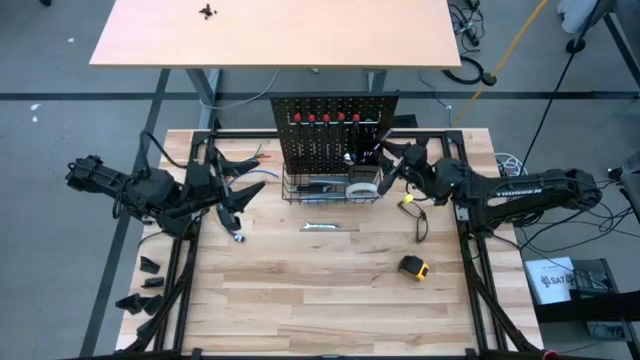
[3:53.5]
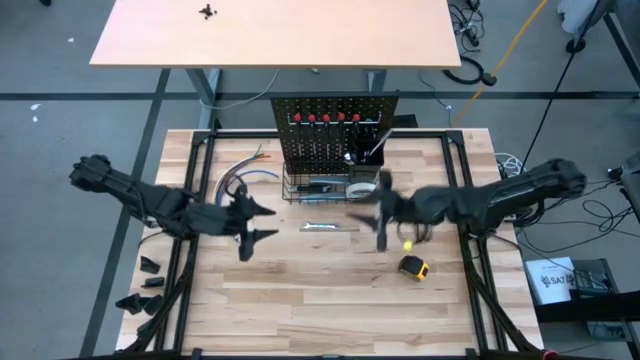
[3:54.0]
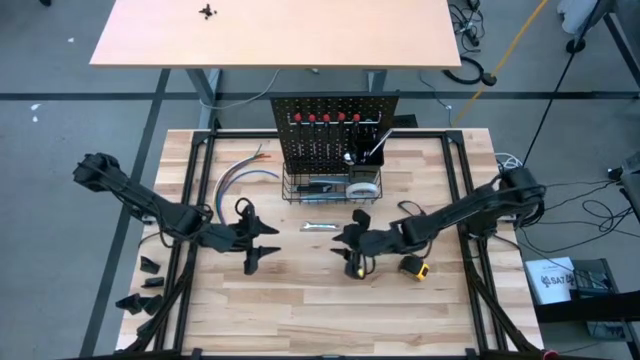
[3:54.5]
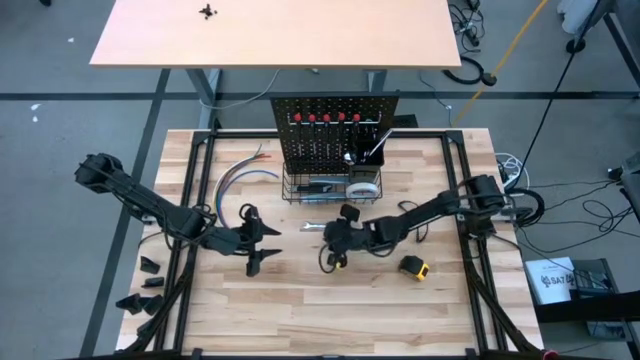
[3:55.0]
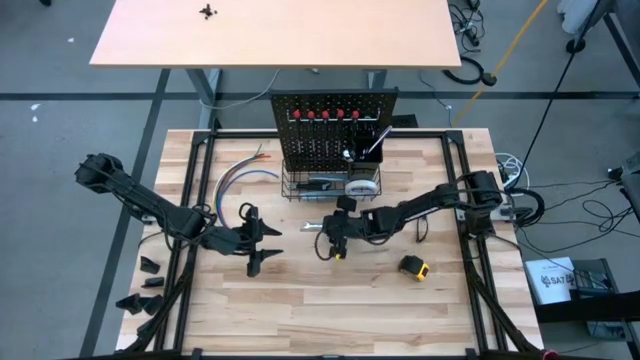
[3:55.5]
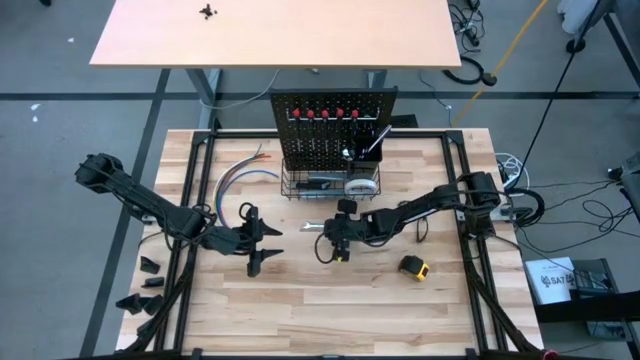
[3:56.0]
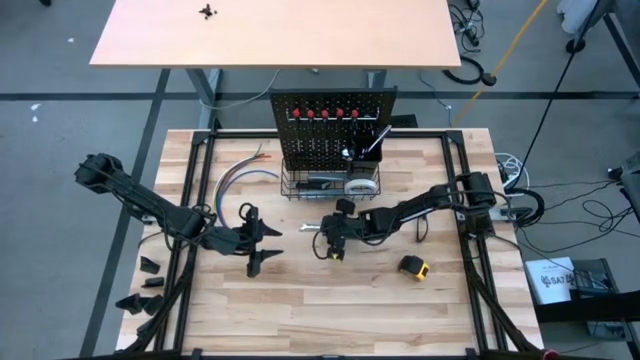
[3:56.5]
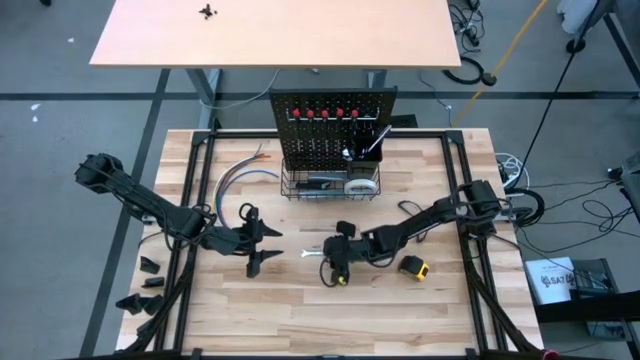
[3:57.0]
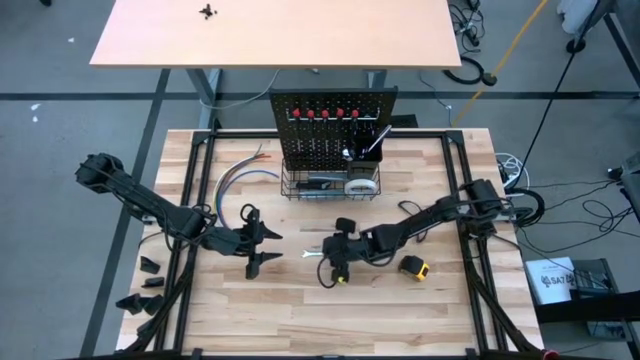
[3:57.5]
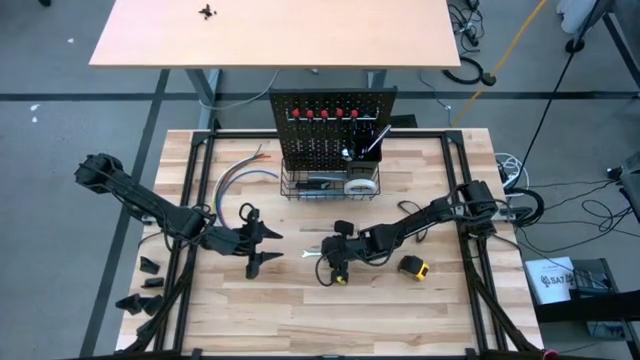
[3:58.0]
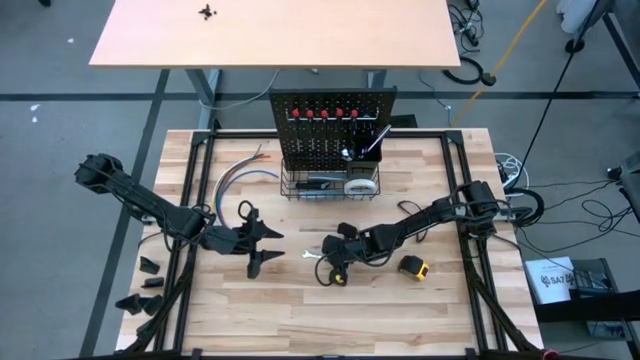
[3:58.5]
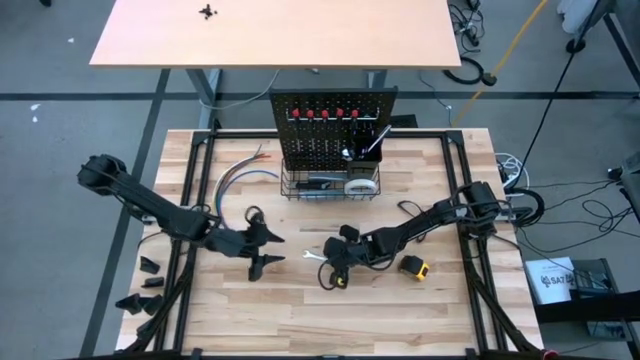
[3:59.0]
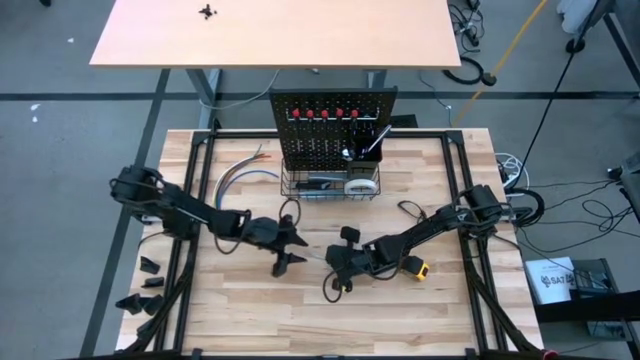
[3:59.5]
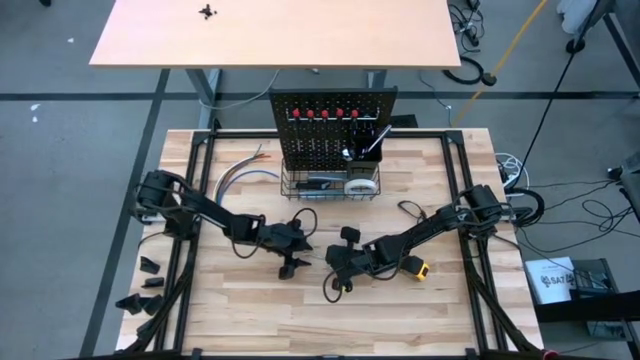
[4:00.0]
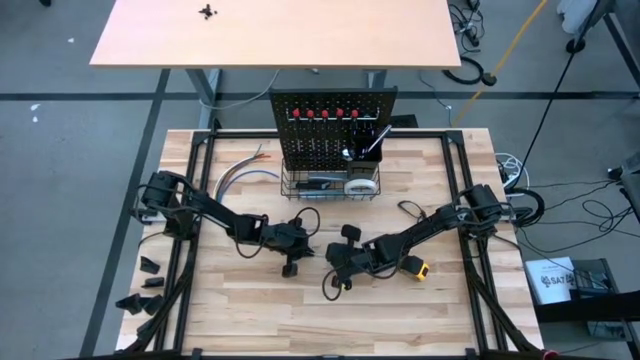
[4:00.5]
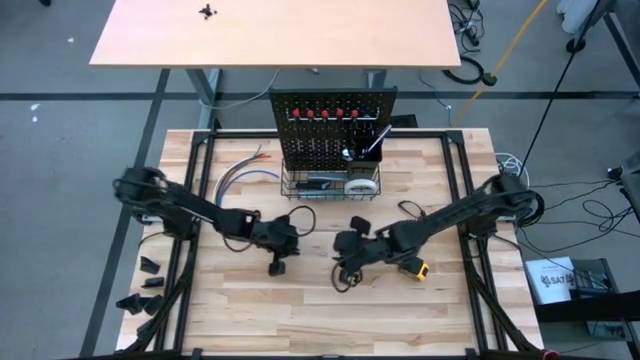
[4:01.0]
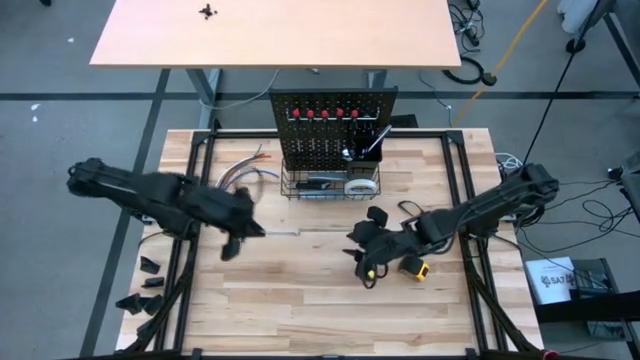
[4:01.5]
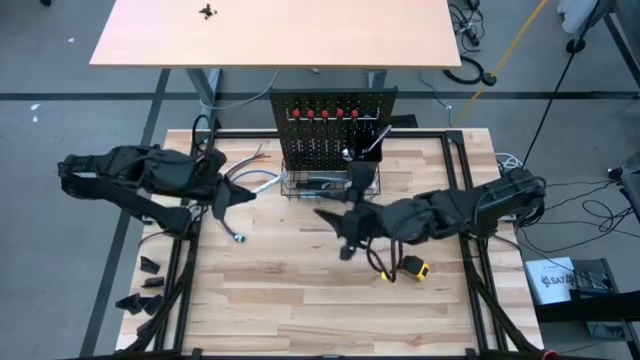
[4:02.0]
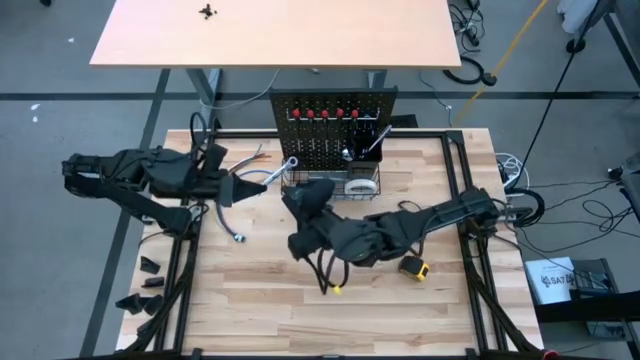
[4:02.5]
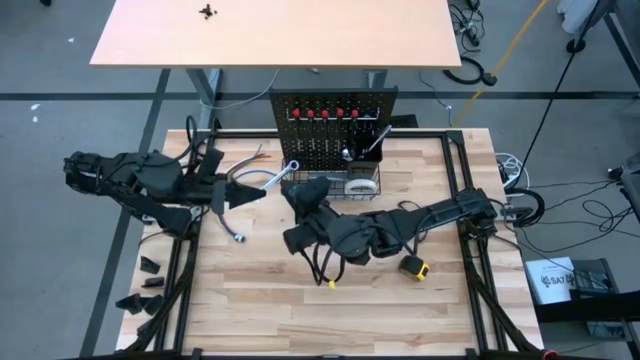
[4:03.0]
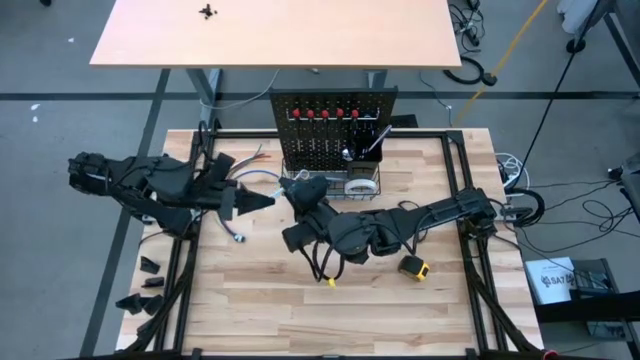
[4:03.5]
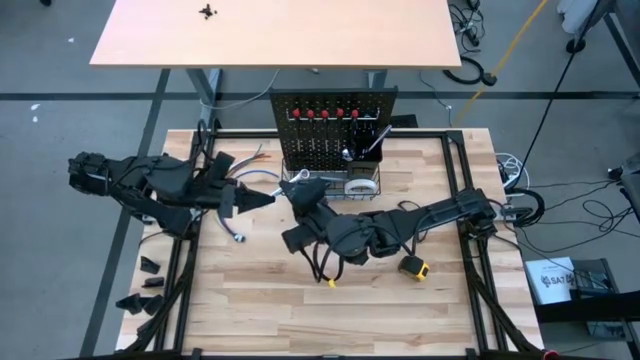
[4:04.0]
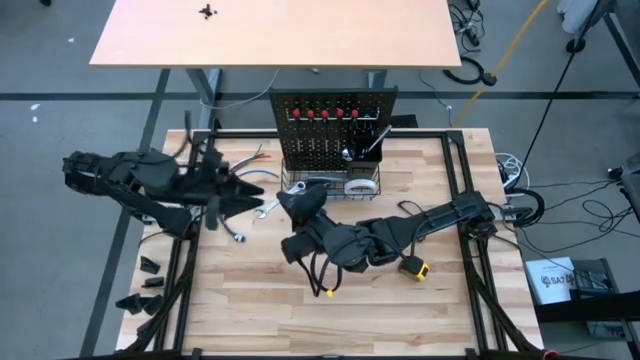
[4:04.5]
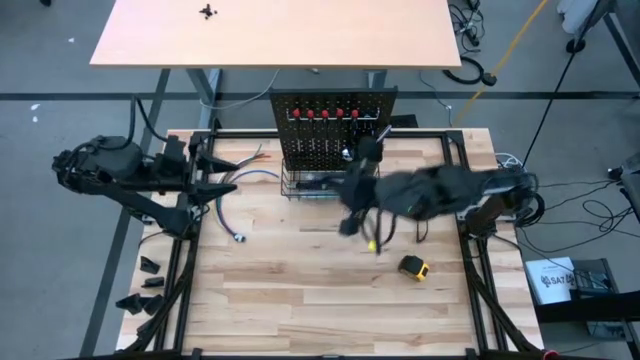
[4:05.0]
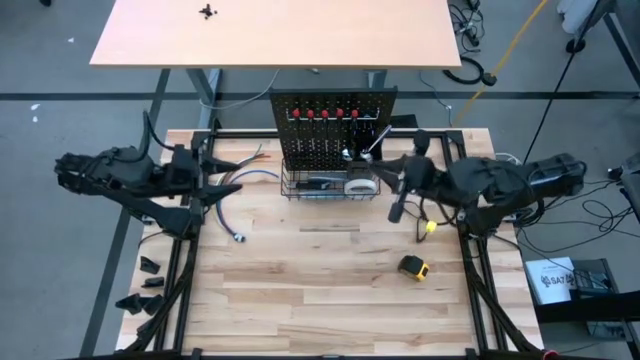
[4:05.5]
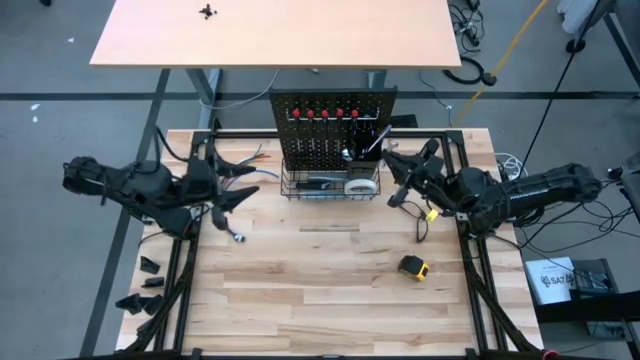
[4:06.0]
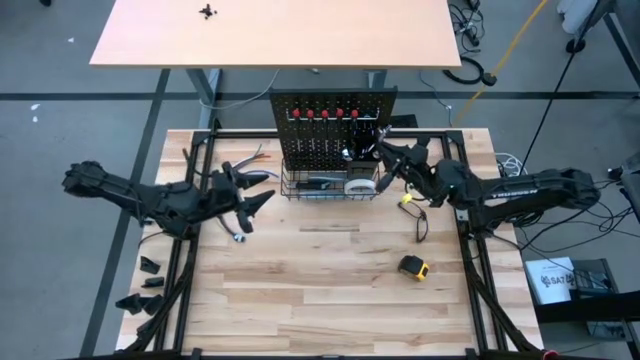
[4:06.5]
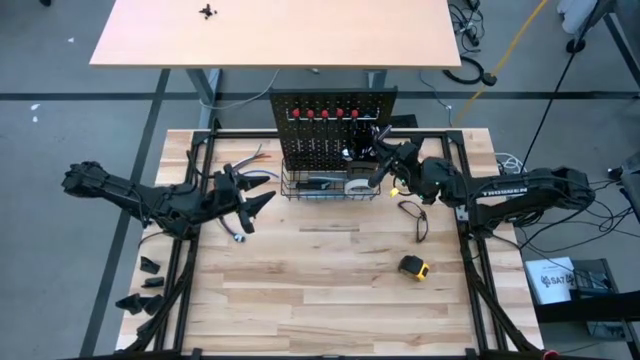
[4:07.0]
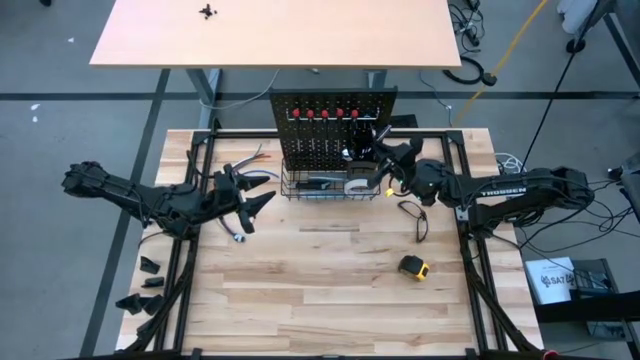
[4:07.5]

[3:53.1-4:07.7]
Task: Hang tools onto peg board
Put the wrench into the pegboard bin

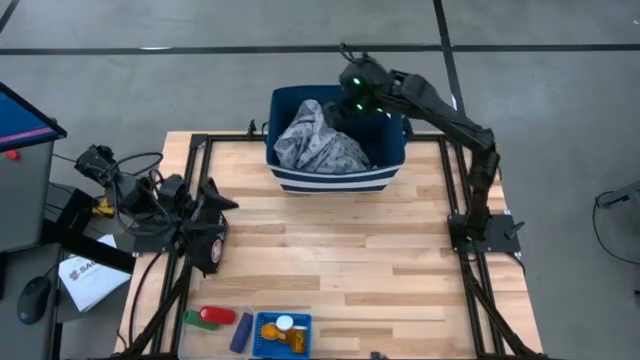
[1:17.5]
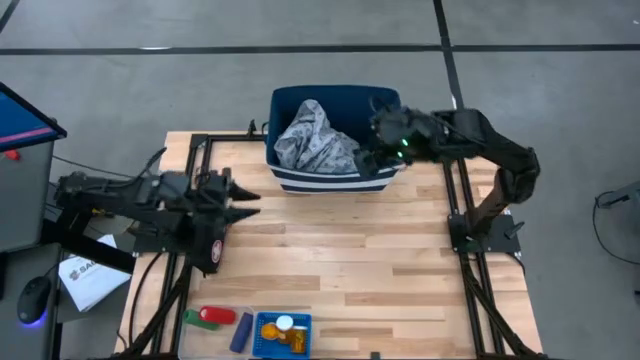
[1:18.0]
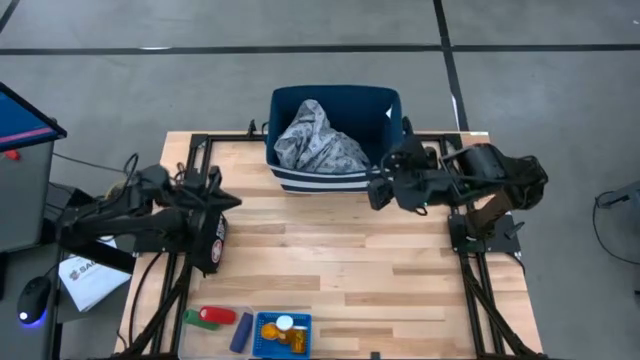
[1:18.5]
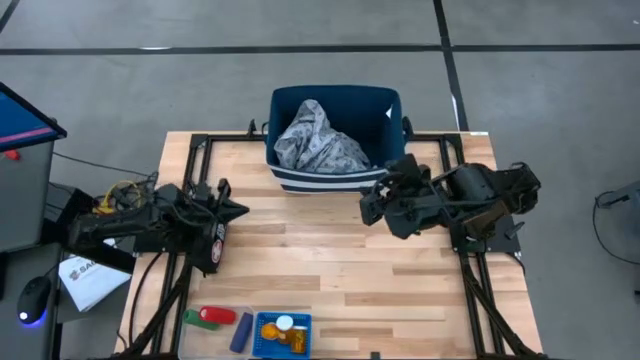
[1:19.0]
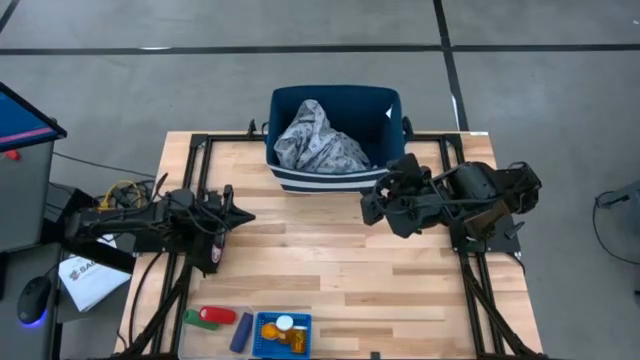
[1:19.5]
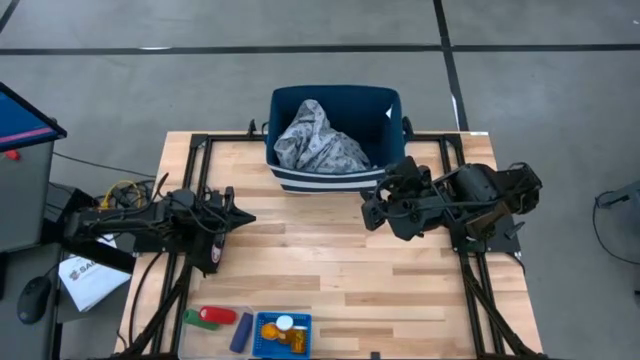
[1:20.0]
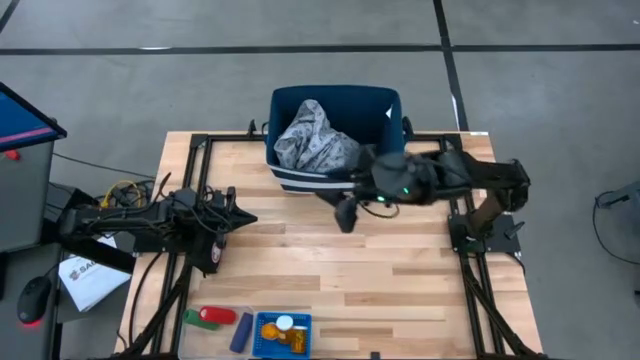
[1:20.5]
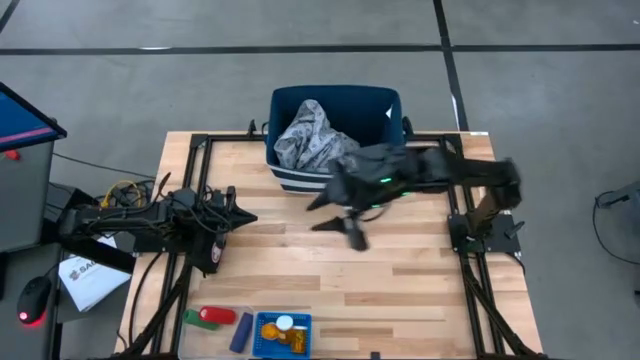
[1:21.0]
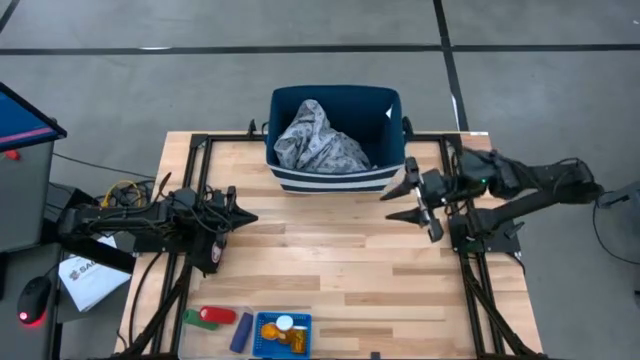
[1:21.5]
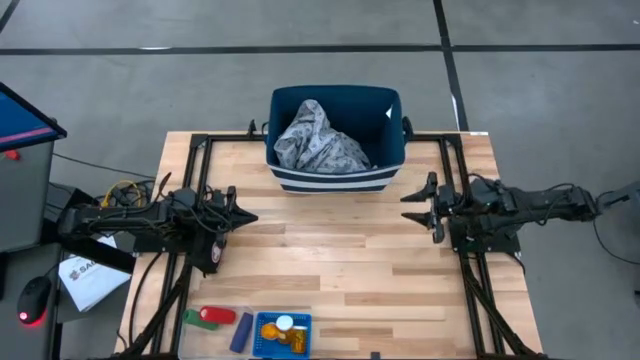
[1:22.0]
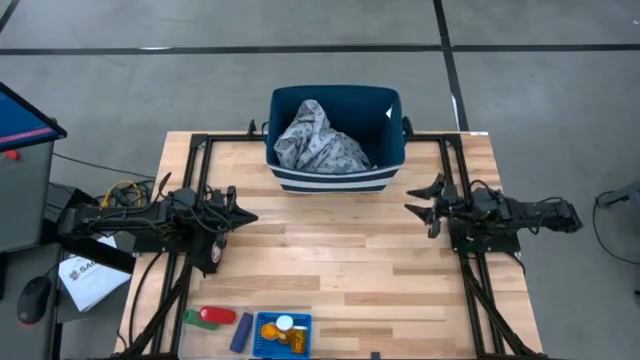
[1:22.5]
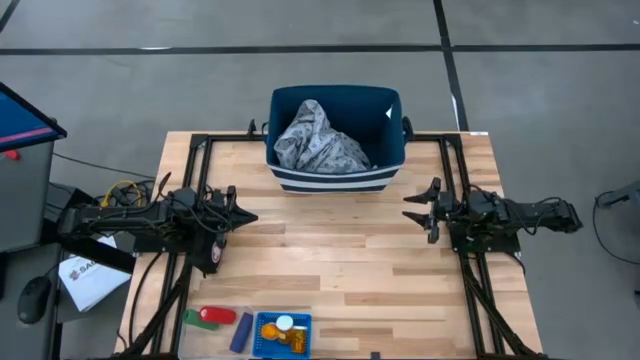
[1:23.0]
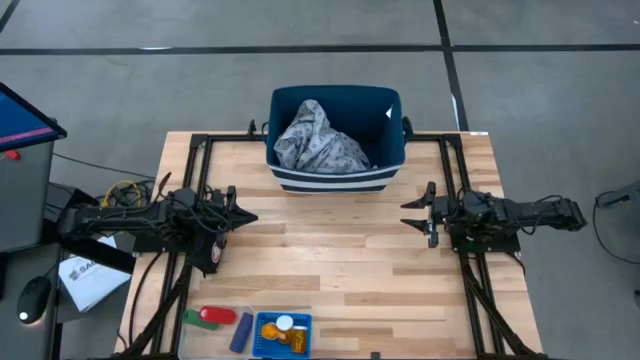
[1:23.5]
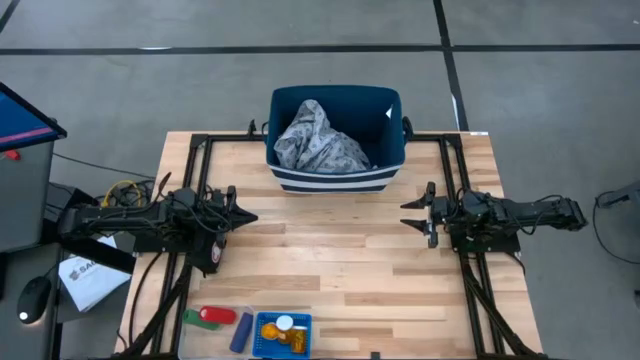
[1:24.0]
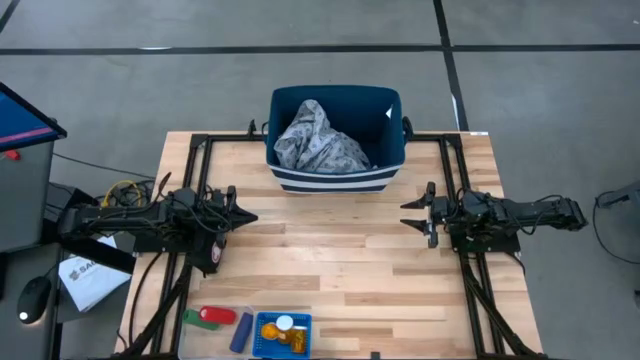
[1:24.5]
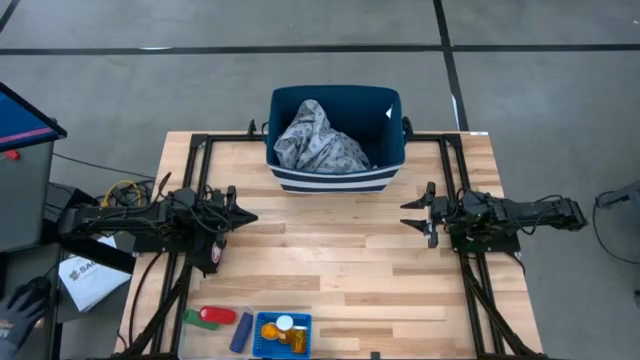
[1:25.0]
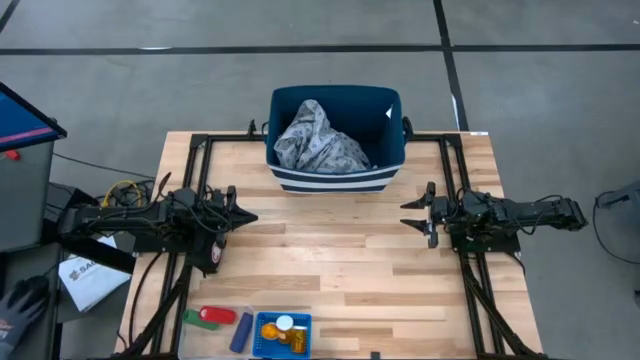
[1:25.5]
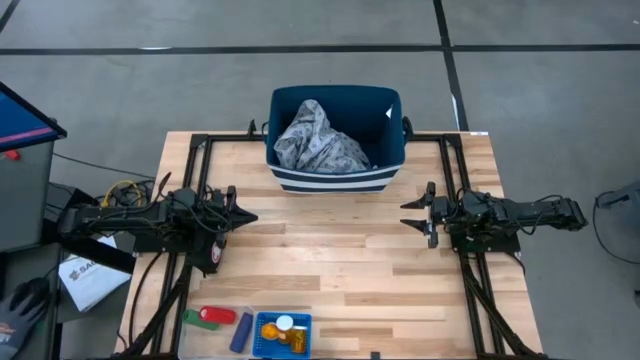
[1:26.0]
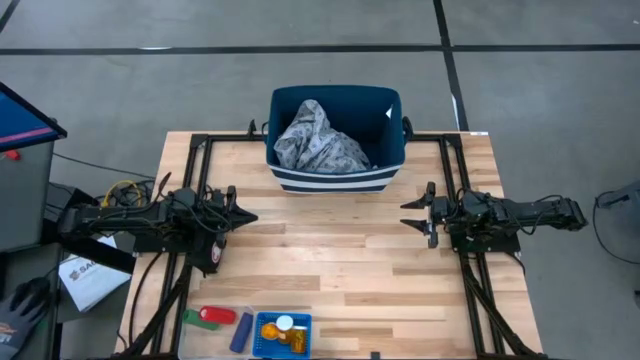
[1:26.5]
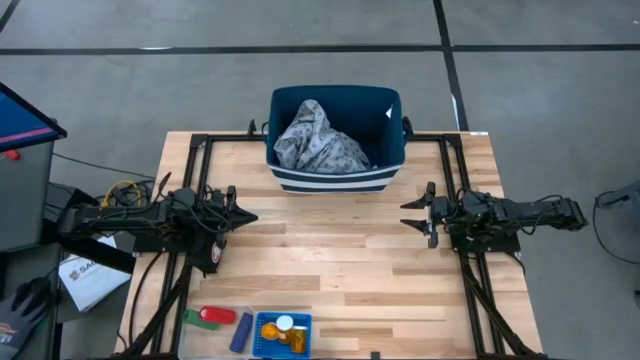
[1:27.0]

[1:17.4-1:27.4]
Task: Pick & place medical supplies in basket/bin
Return to Home Position
